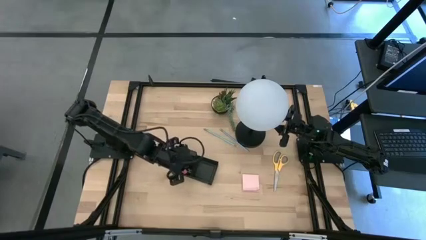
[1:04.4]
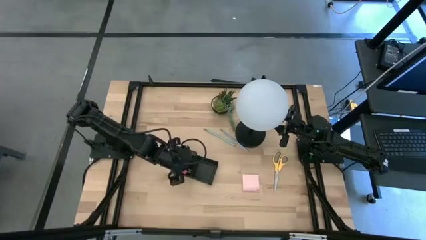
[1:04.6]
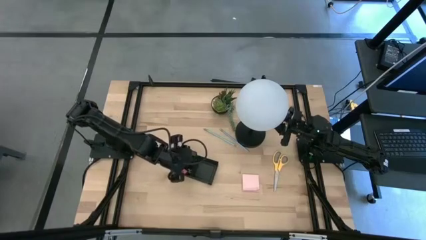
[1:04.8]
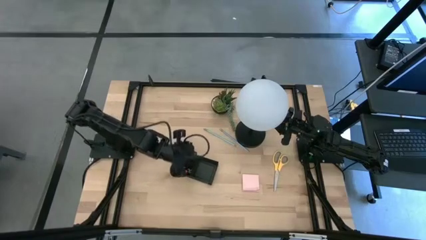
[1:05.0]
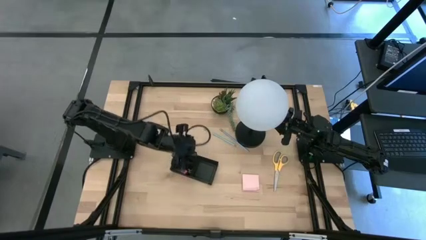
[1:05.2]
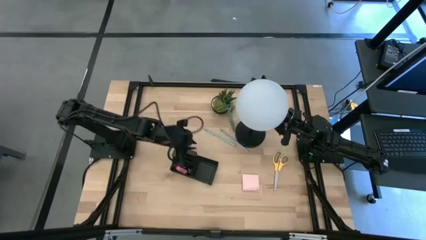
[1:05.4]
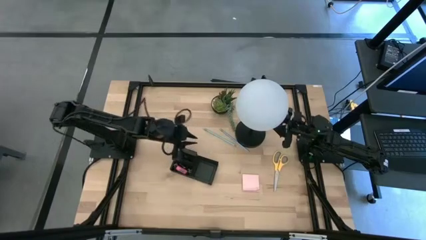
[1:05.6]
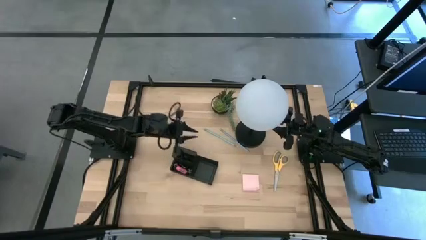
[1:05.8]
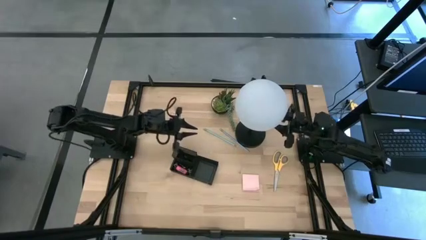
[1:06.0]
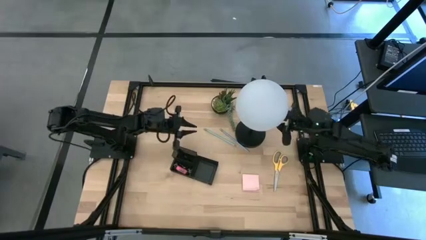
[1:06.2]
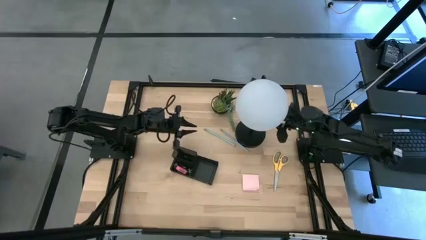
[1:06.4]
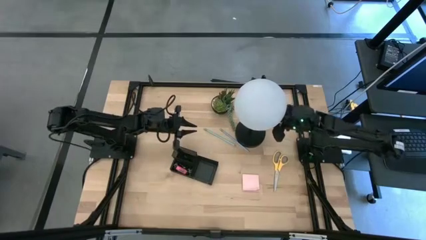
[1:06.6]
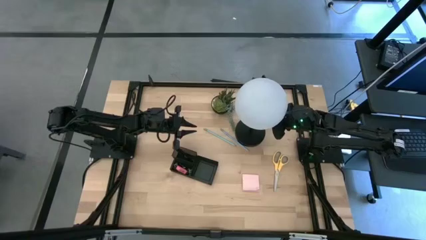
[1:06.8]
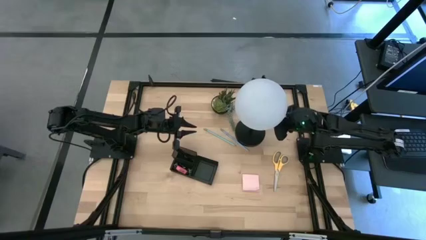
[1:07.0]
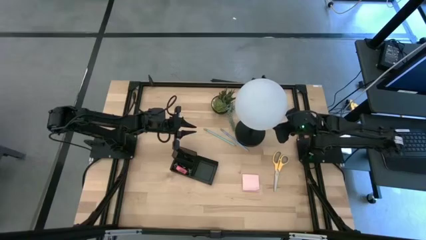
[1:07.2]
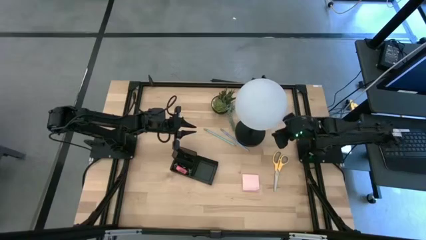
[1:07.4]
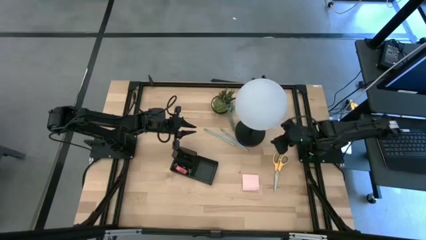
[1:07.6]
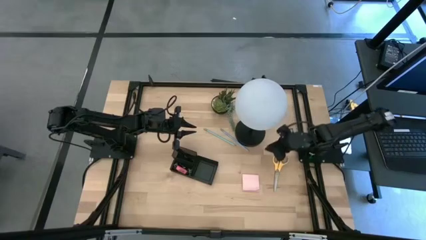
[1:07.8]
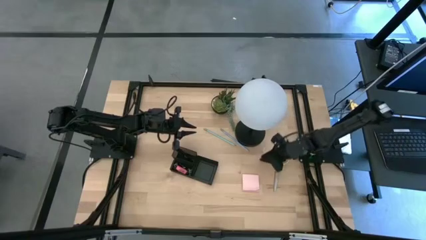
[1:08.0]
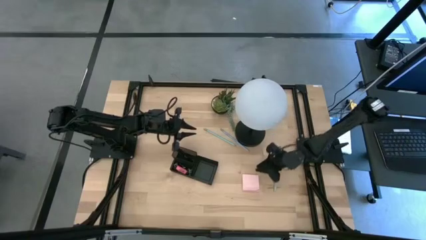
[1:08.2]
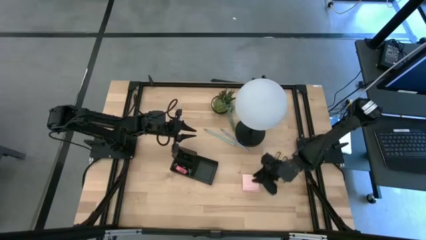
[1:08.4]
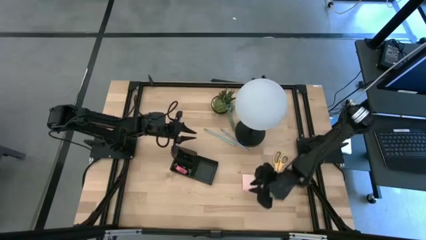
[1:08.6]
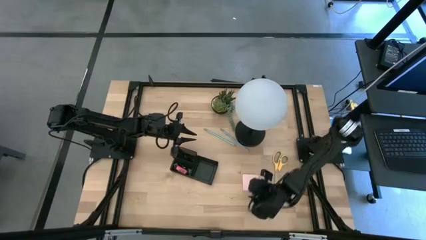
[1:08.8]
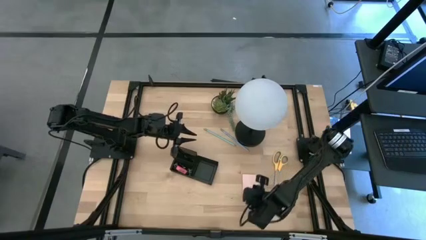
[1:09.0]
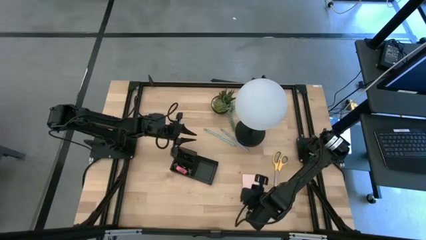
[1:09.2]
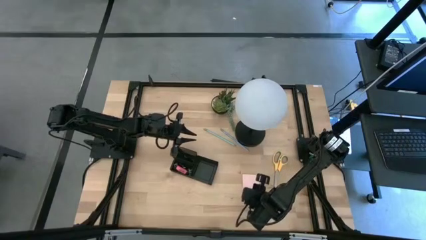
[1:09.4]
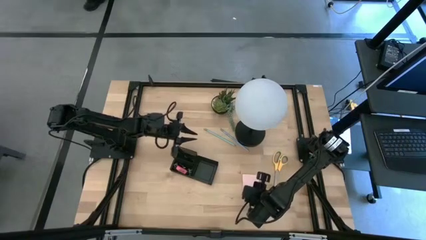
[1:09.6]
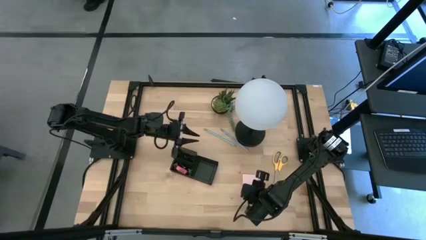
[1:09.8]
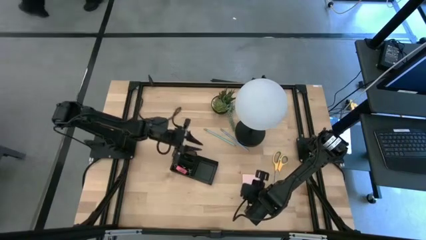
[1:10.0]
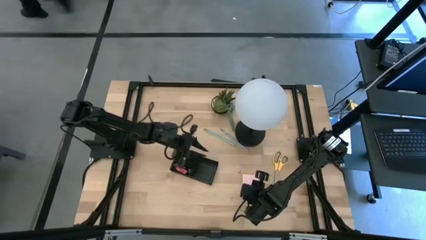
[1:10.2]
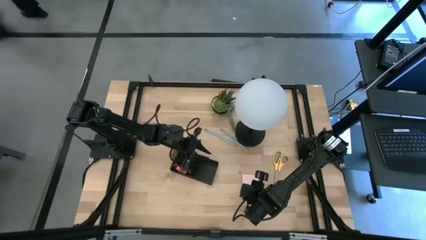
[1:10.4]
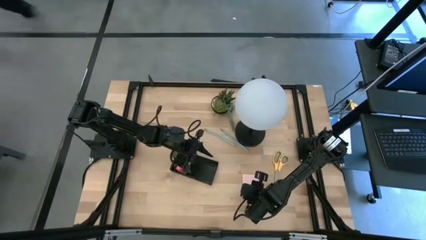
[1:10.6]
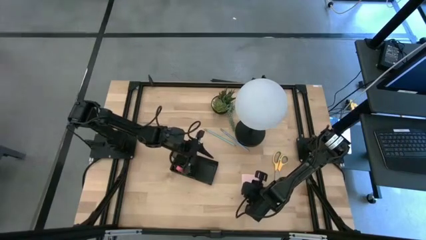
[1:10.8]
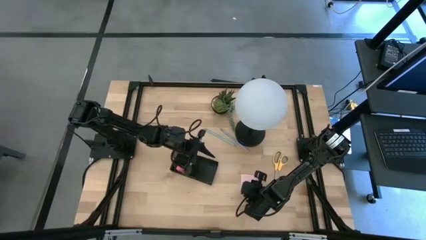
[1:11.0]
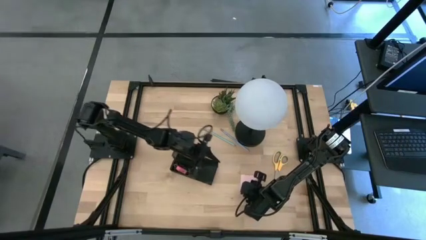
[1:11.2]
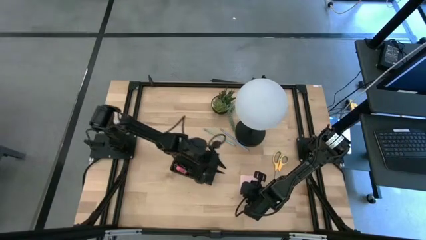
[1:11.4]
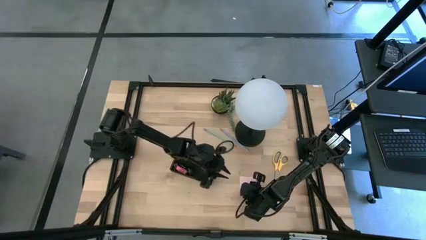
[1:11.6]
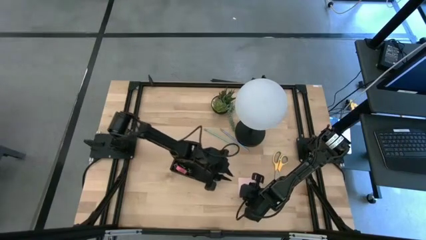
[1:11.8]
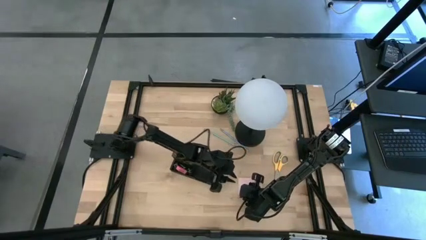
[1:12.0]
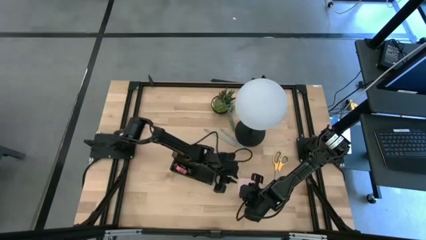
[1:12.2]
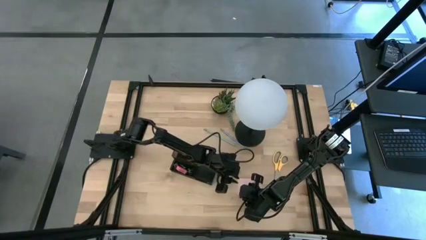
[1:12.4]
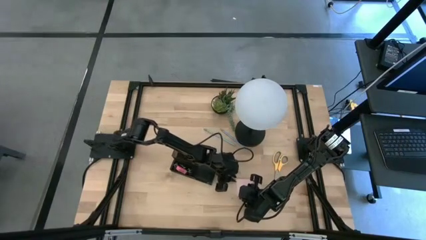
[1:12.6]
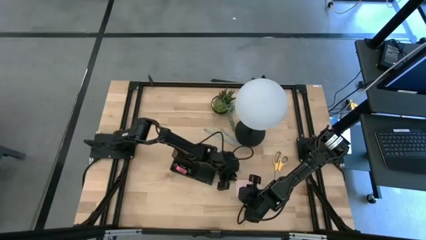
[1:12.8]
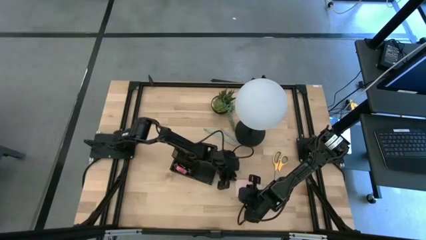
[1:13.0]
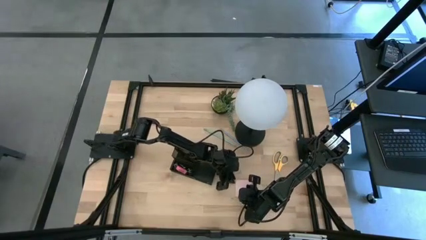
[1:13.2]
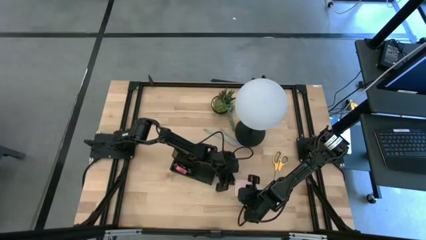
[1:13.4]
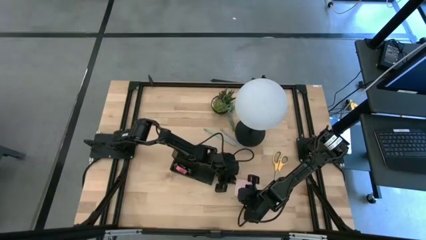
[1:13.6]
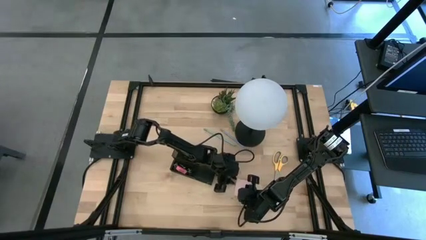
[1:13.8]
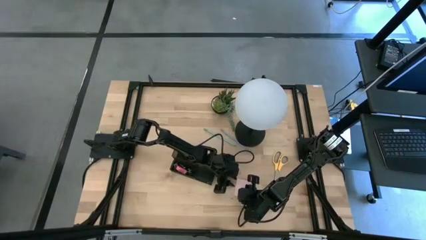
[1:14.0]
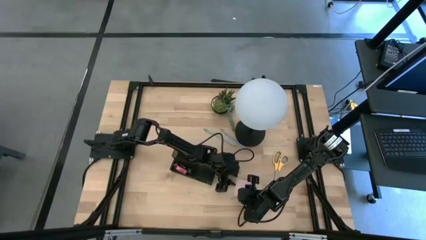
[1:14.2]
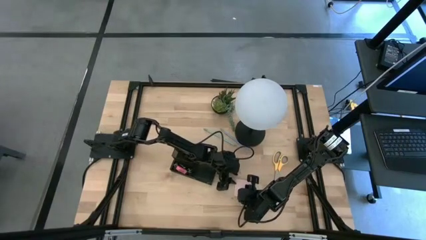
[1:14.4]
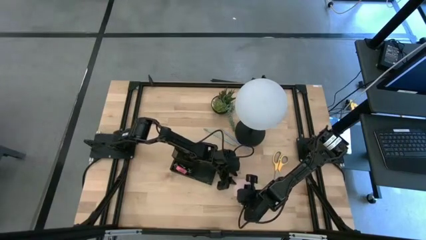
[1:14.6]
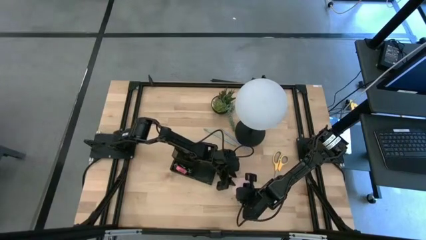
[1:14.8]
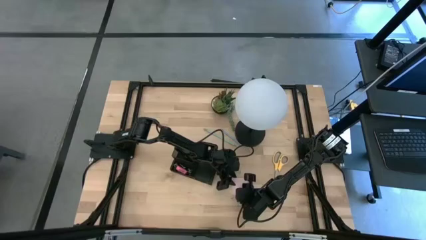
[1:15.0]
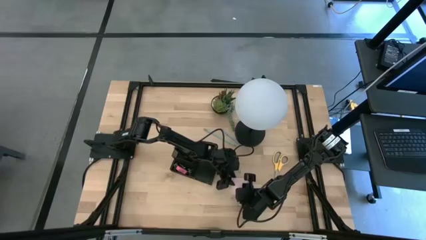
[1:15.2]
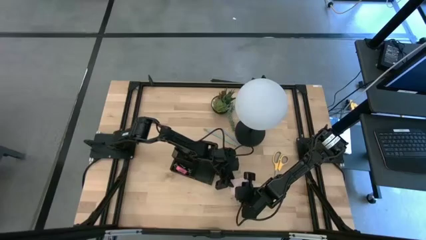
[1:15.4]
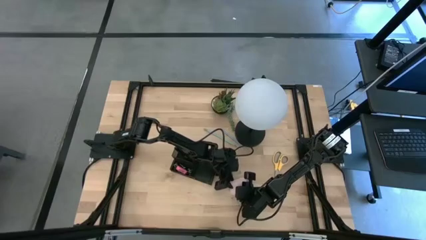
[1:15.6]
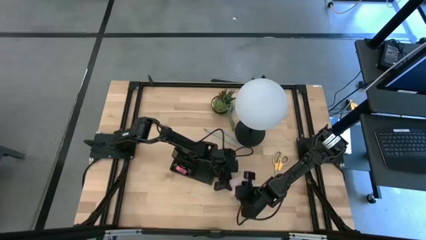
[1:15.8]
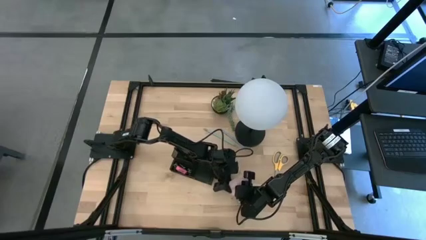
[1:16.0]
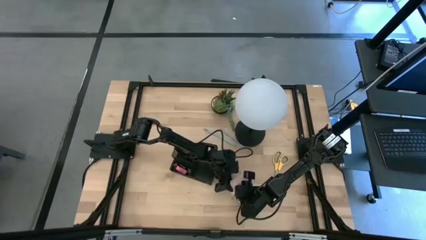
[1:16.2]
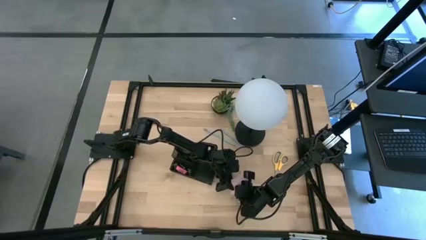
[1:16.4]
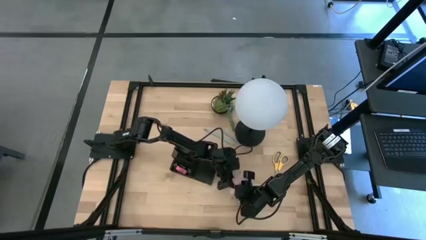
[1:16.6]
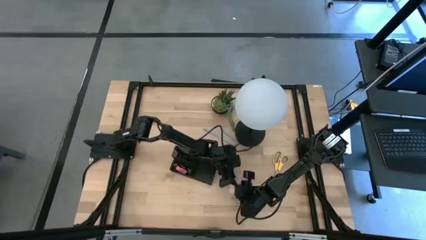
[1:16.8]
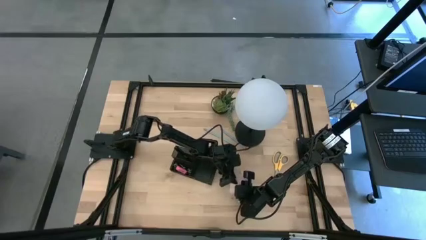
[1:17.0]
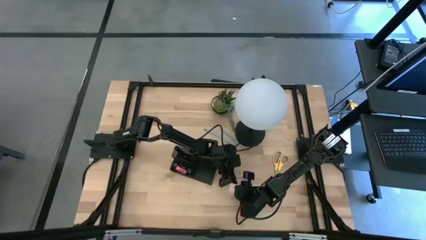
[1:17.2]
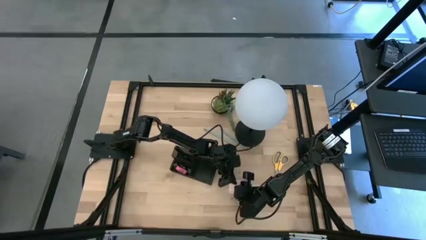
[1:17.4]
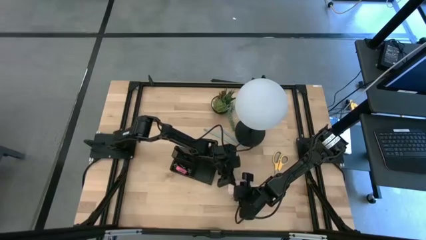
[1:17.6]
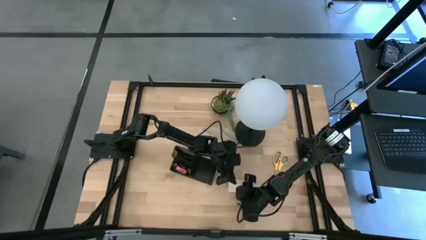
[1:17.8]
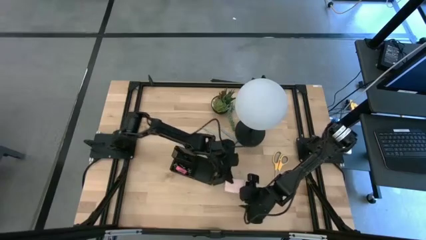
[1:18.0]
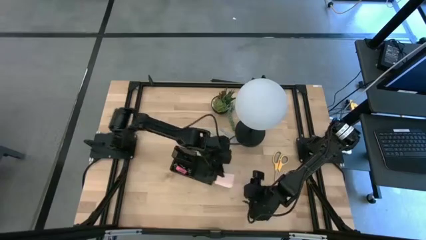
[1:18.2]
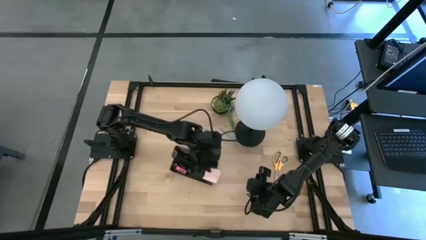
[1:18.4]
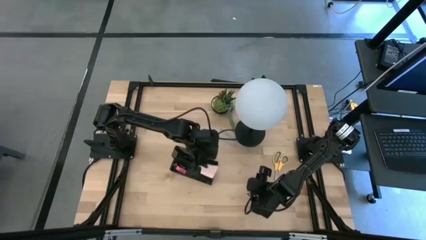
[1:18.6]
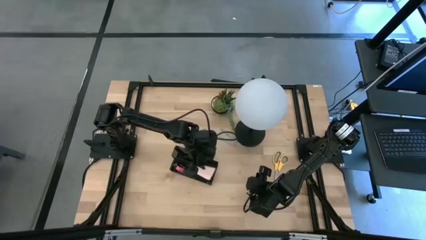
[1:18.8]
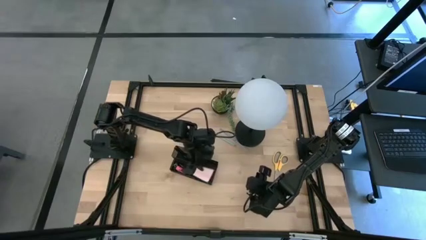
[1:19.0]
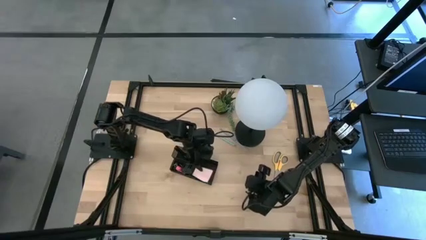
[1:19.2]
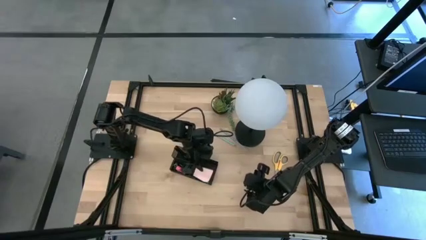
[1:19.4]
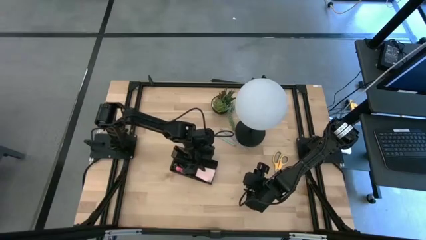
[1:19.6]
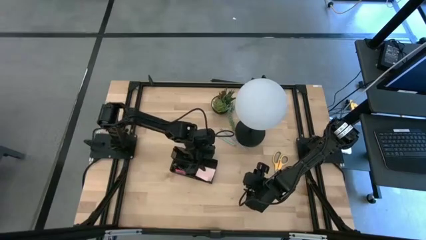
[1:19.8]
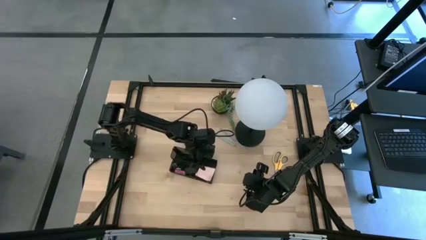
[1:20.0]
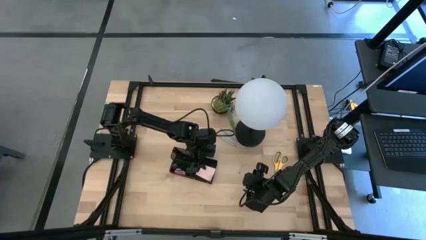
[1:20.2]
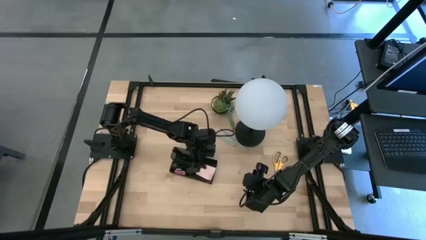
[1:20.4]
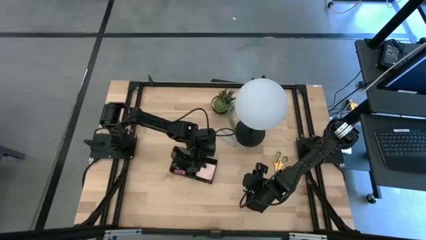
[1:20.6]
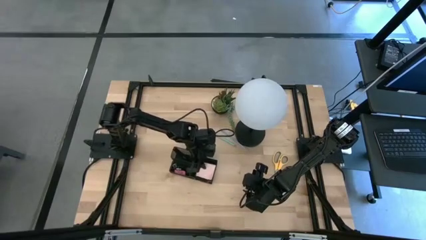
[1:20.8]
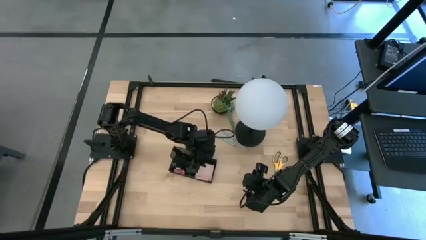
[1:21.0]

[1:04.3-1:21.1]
Task: Pick and place office supplies into organizer
Put the sticky notes into the desk organizer
